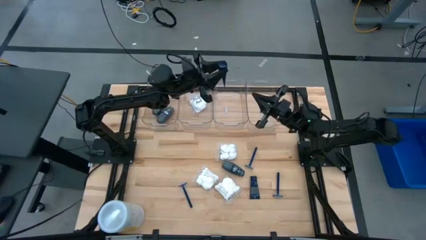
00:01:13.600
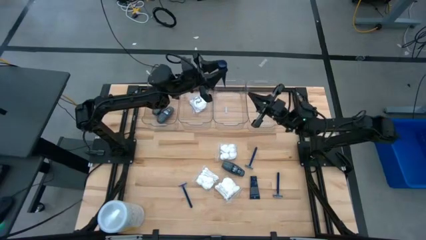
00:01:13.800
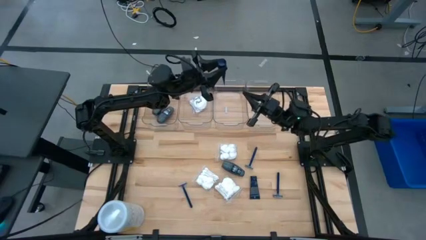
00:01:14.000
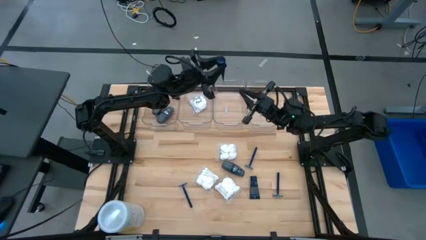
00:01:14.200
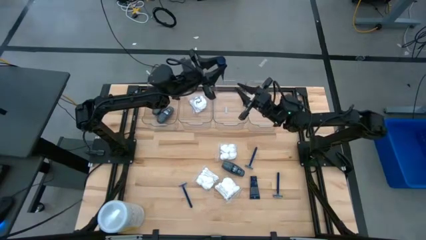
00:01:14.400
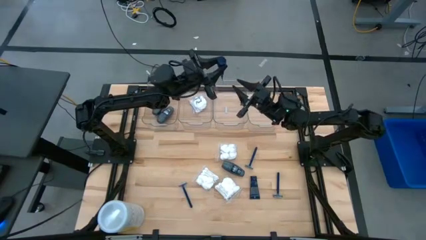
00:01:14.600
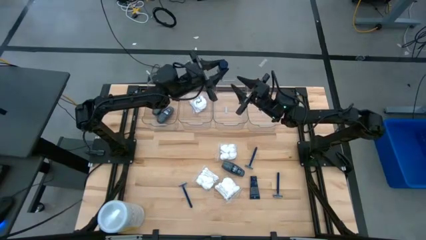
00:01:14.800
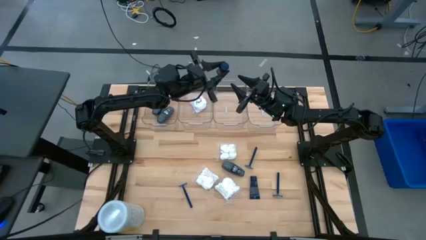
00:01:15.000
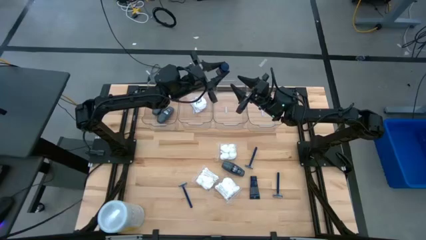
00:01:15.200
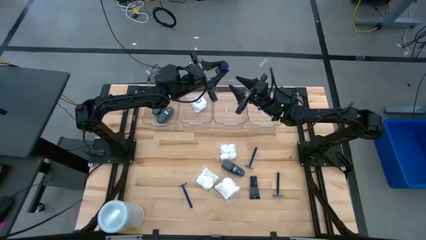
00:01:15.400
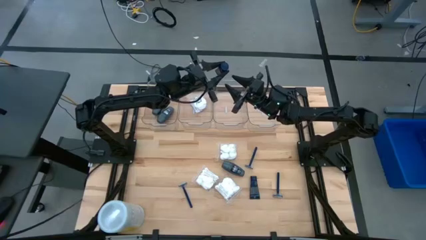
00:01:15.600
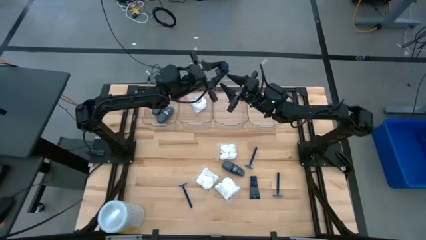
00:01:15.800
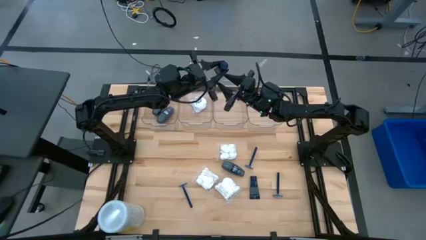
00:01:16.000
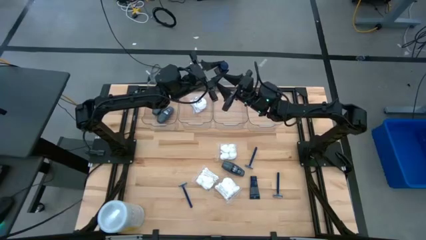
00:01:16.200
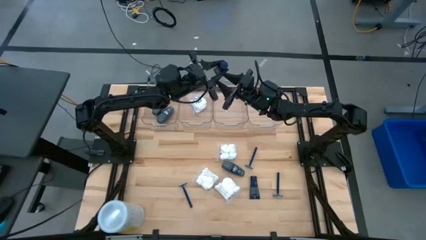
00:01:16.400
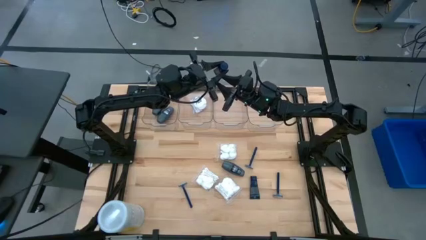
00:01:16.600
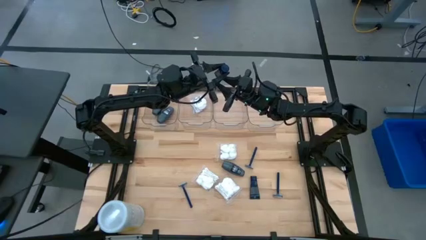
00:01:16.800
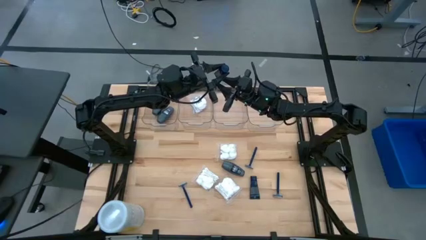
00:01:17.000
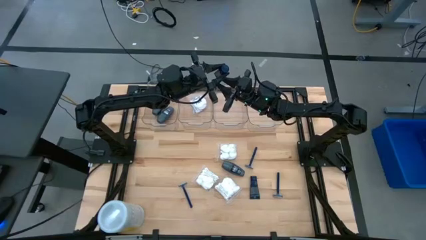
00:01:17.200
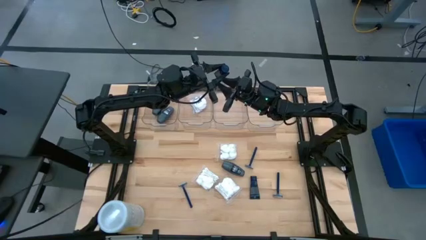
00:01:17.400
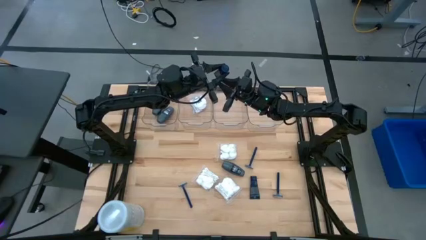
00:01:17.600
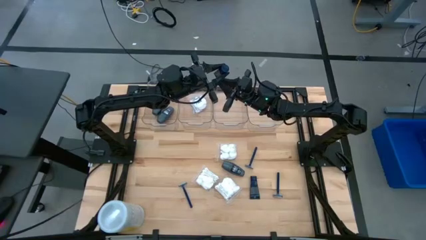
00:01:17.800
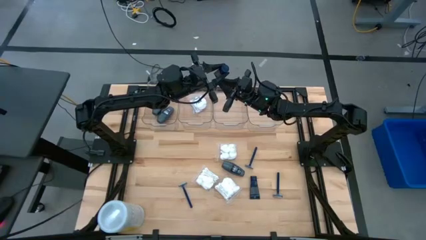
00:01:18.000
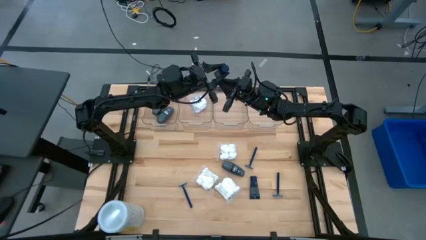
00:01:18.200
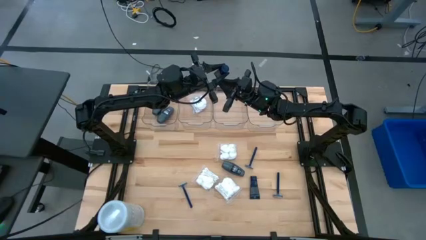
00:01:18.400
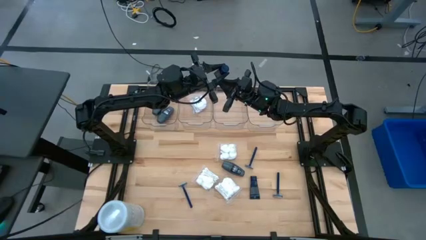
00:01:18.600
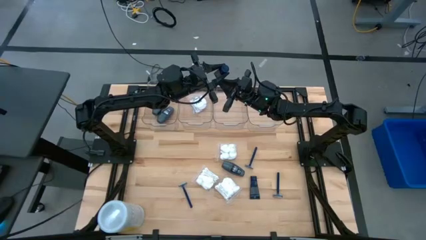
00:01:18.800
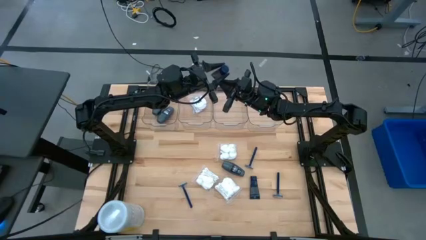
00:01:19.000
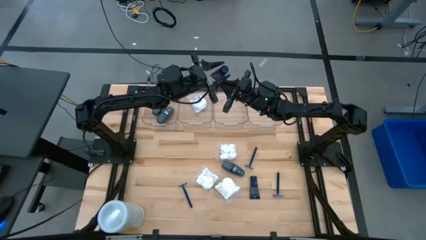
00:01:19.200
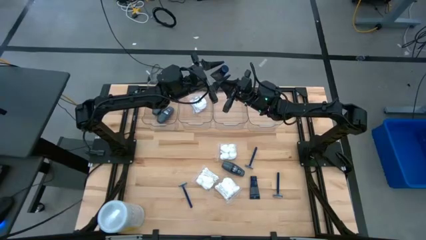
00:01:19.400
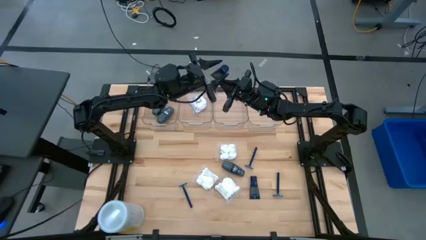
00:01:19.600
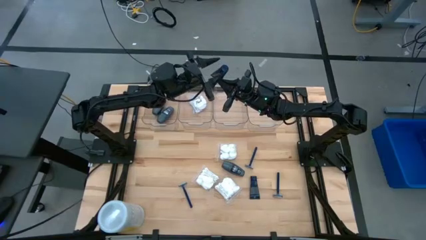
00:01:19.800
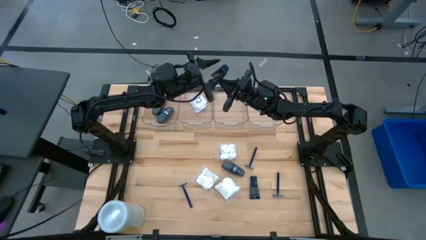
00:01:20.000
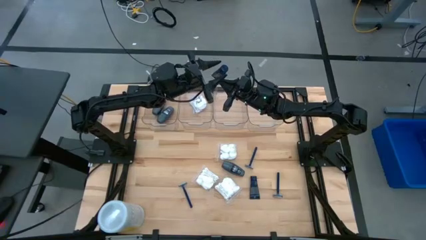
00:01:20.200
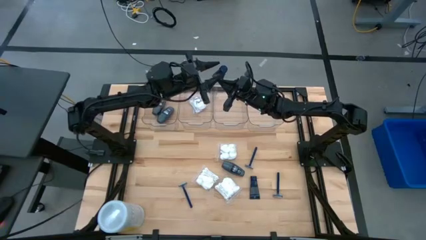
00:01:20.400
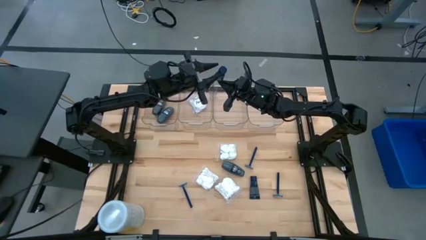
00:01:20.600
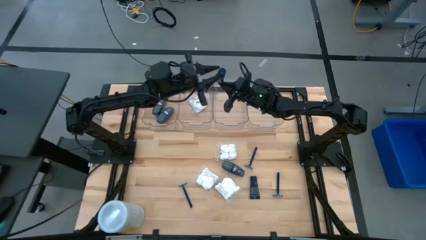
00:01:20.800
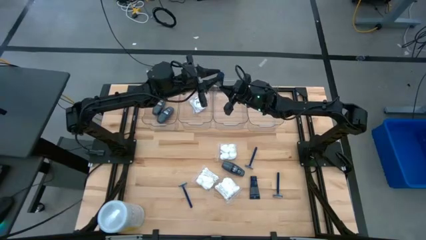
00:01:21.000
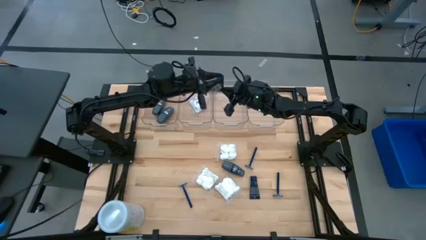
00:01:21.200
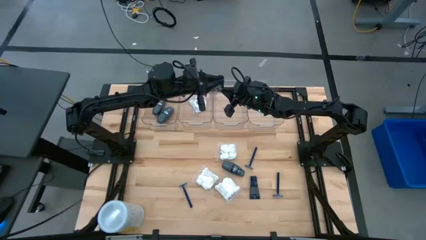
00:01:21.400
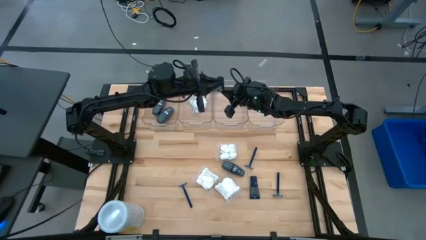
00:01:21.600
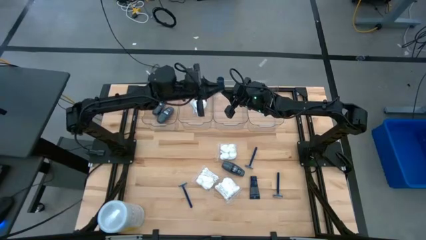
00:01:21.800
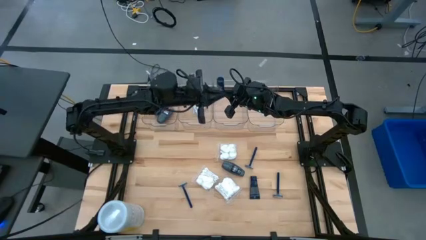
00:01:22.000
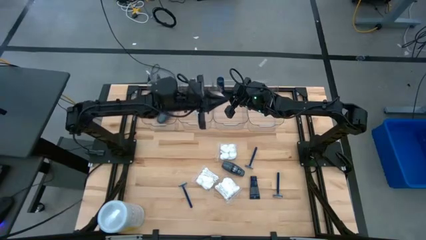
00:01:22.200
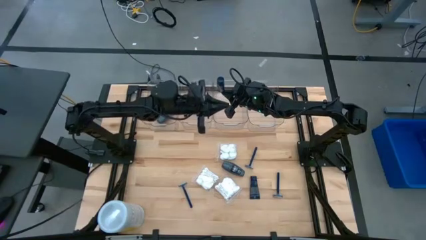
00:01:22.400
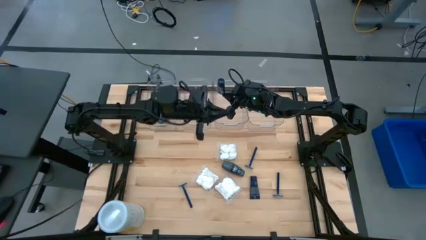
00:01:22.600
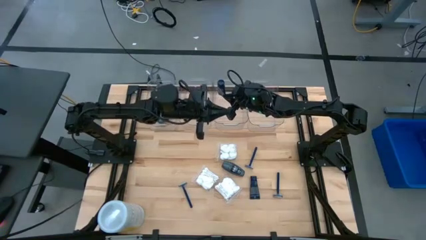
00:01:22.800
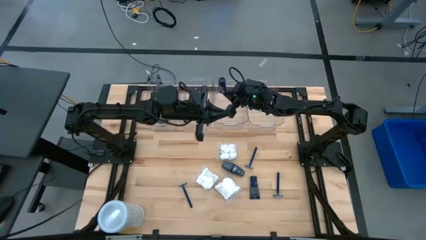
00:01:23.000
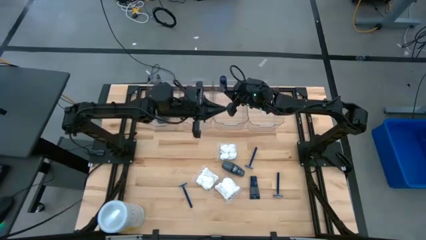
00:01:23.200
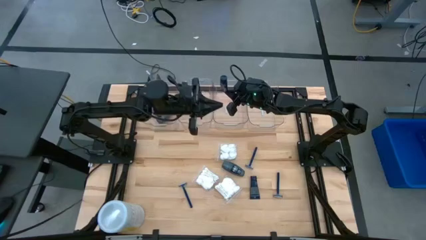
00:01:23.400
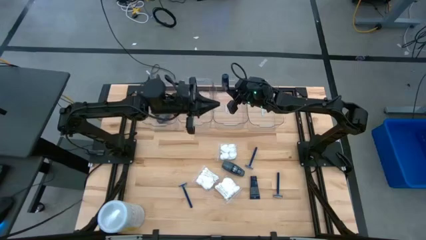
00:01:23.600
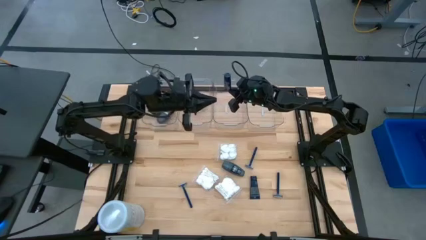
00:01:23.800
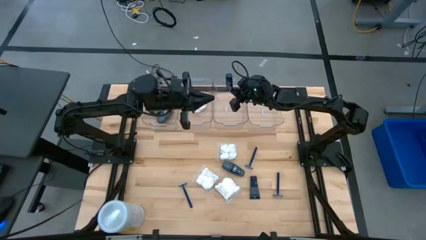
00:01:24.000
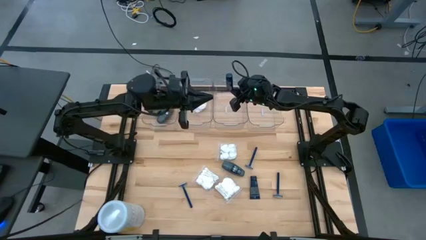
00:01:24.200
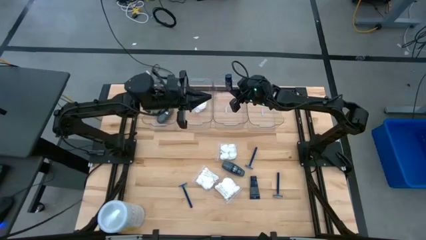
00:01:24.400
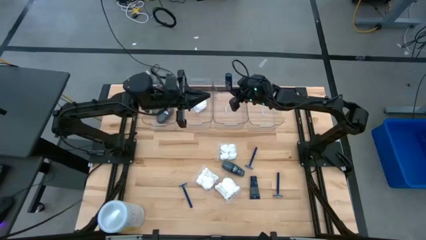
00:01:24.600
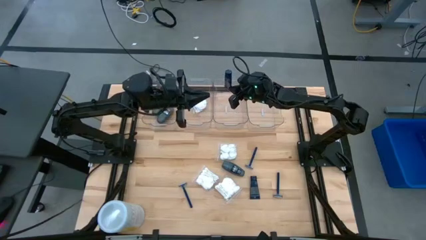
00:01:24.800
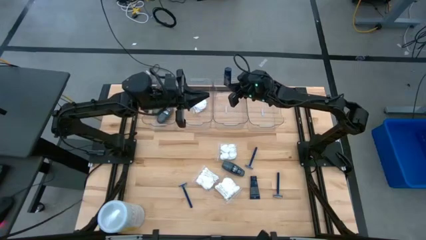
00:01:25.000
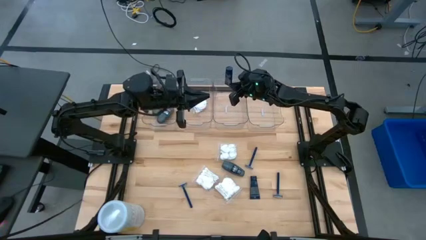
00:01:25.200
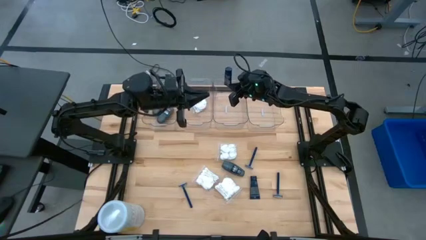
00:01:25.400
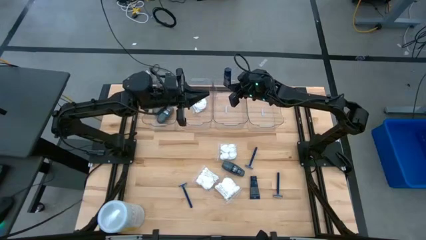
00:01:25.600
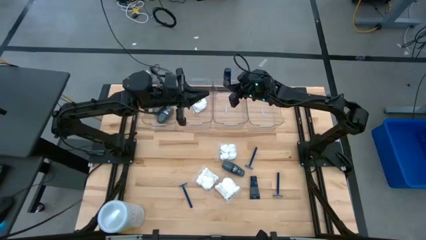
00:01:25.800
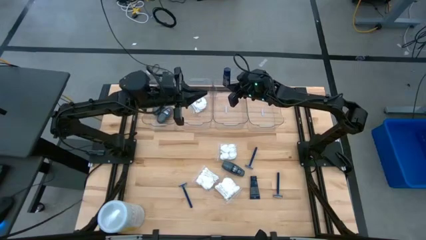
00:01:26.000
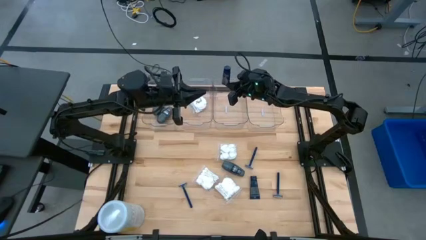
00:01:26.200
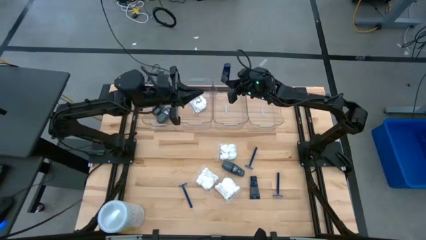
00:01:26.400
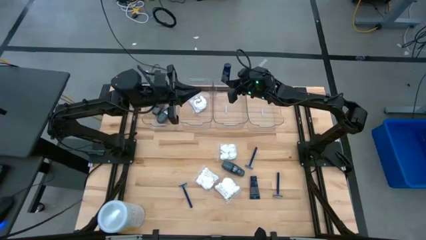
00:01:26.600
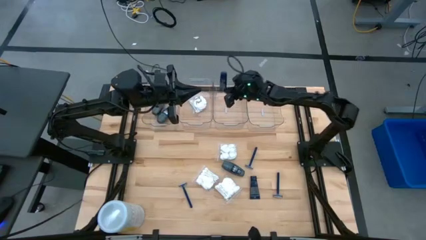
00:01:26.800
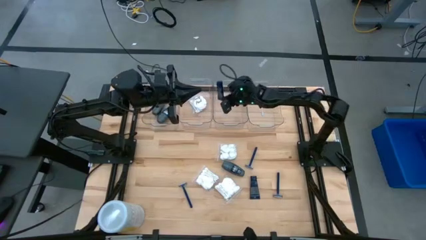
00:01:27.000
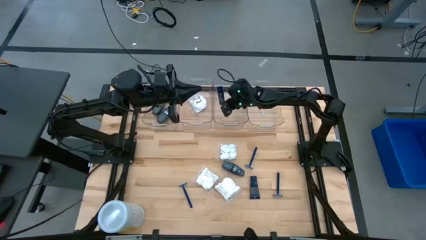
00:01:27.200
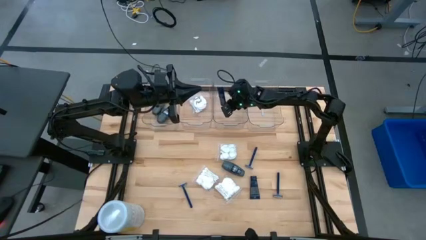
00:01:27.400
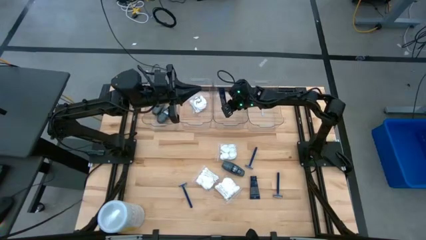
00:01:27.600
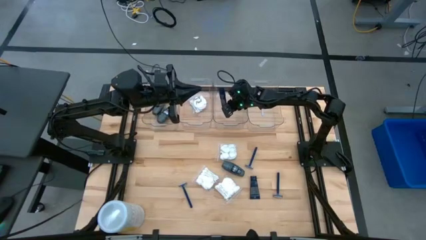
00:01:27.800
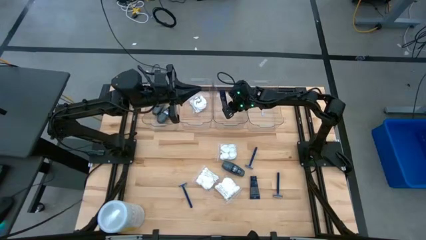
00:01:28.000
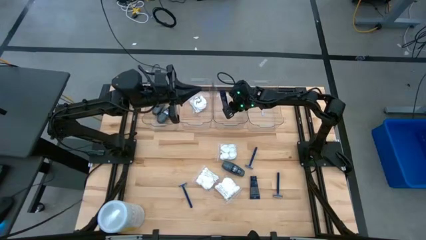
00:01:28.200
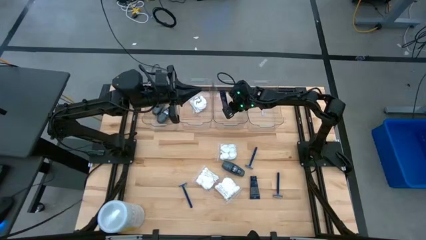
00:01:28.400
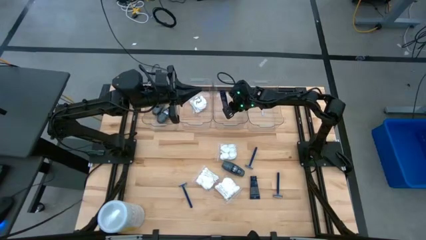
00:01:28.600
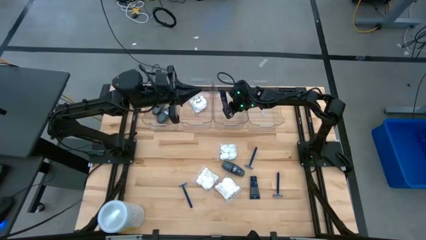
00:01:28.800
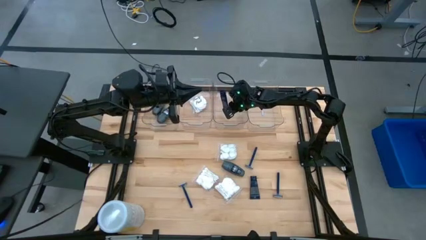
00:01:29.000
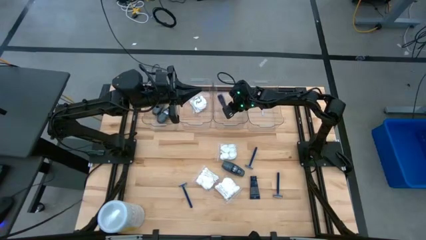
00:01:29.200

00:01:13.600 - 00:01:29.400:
Task: Pick & Place Travel size toiletries
Put the left blue shave cream into the middle right transparent bin

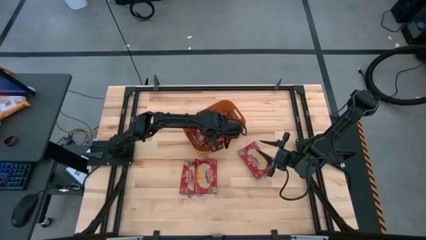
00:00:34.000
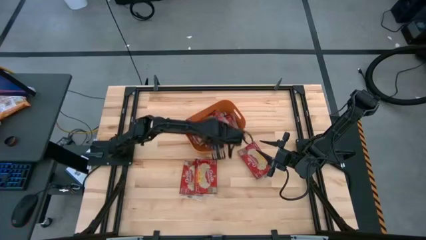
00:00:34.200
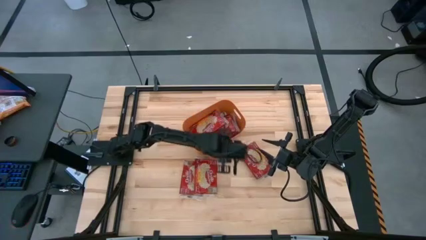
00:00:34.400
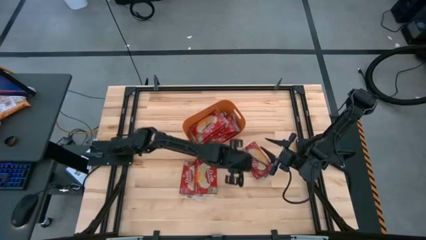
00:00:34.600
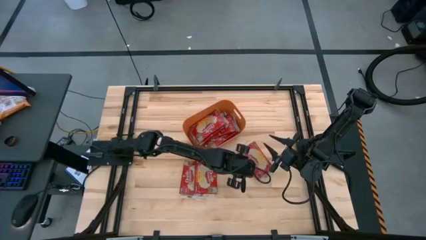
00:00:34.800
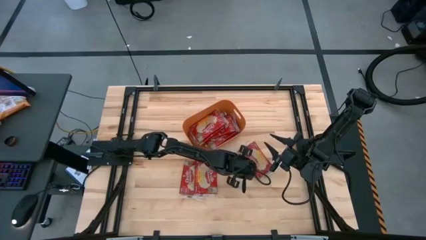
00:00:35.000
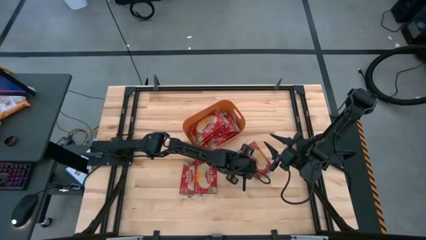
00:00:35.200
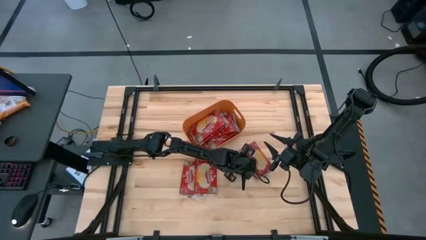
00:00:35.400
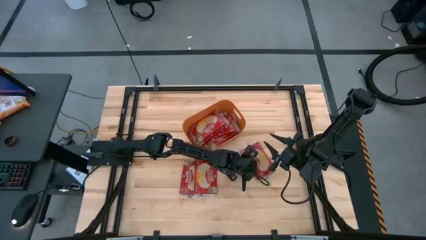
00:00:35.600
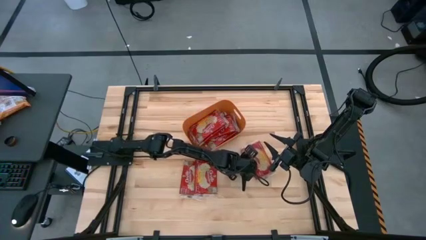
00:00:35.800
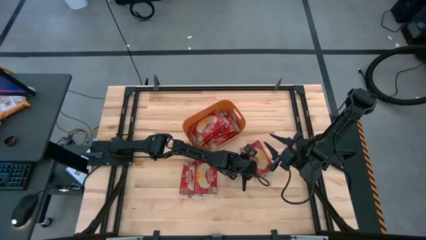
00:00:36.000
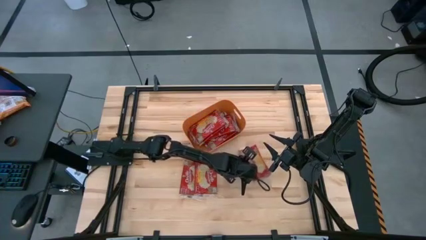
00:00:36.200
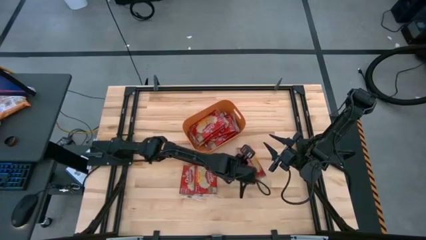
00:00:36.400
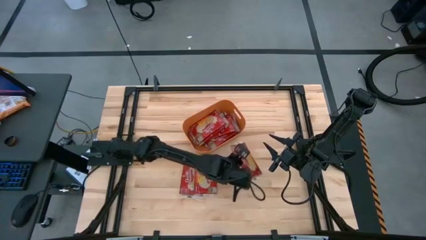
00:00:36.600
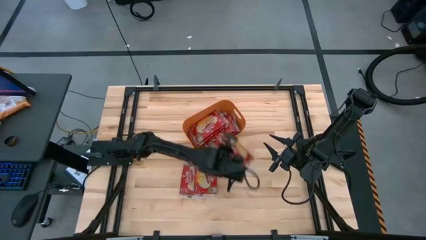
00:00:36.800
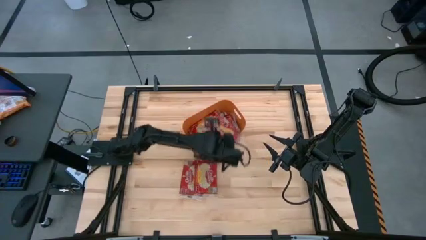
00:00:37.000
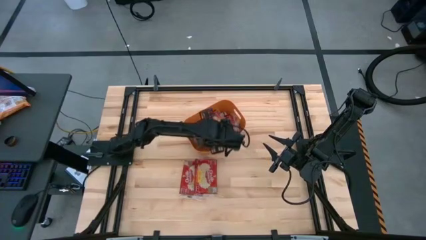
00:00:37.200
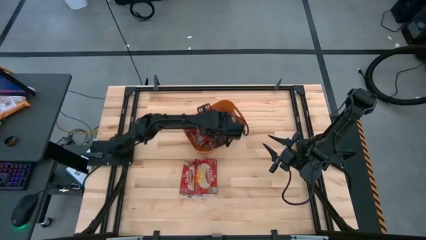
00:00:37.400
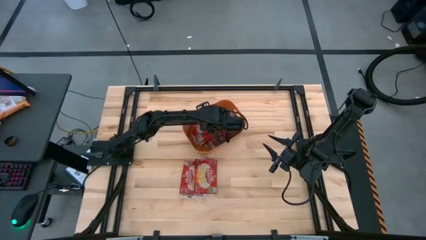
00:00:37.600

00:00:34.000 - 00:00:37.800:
Task: Sort popcorn bags into baskets
Put the pop corn bag into the orange bin
